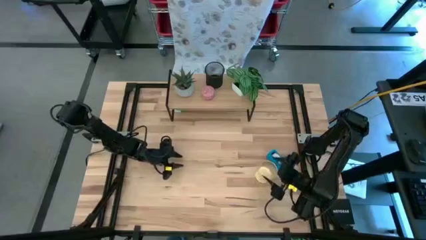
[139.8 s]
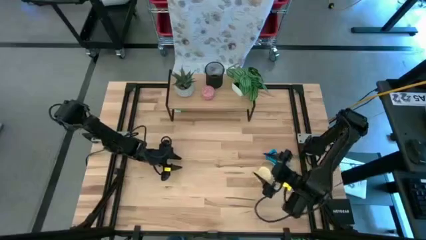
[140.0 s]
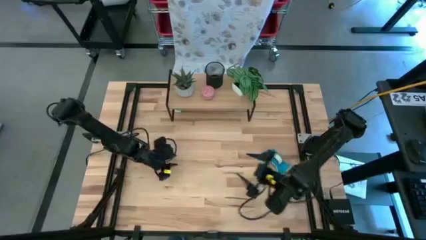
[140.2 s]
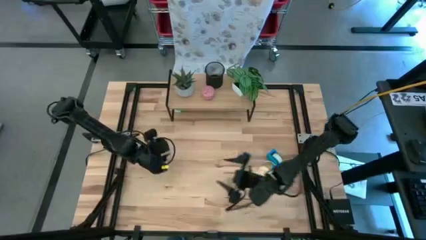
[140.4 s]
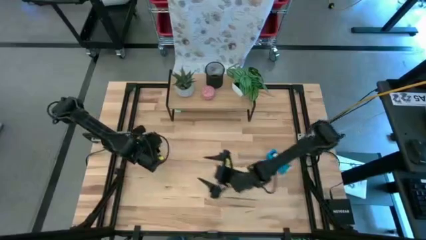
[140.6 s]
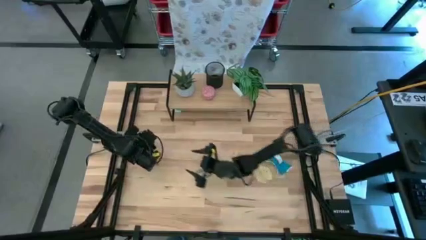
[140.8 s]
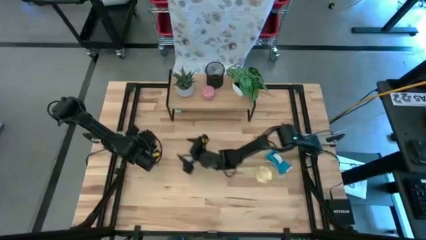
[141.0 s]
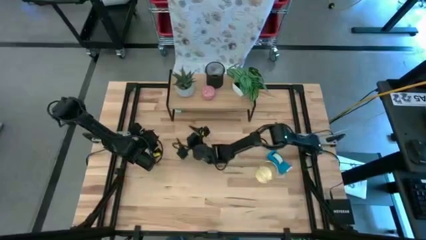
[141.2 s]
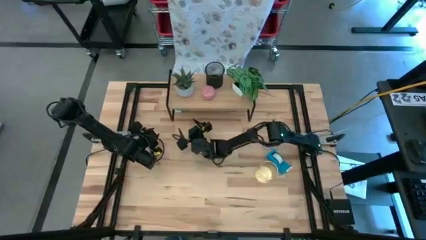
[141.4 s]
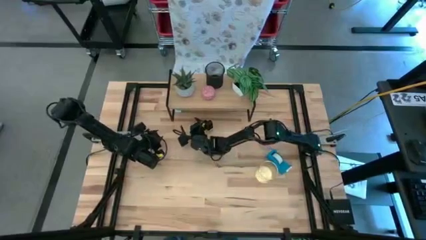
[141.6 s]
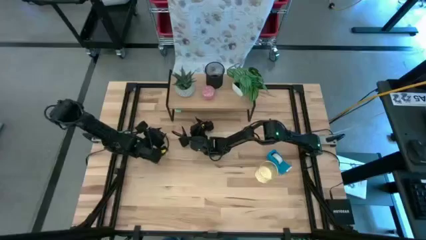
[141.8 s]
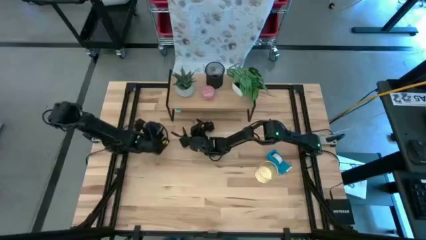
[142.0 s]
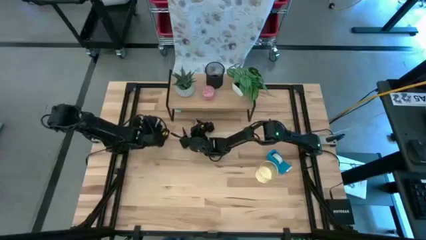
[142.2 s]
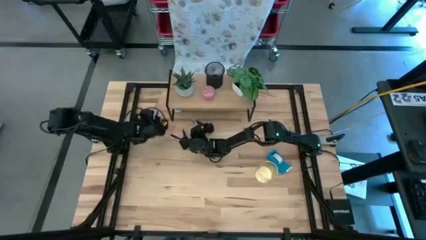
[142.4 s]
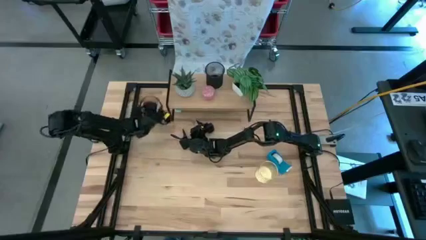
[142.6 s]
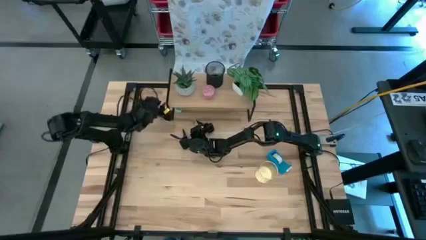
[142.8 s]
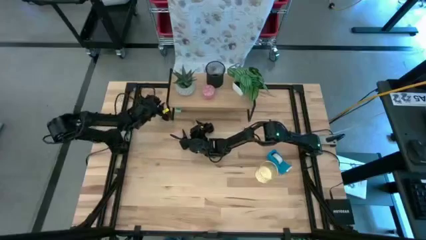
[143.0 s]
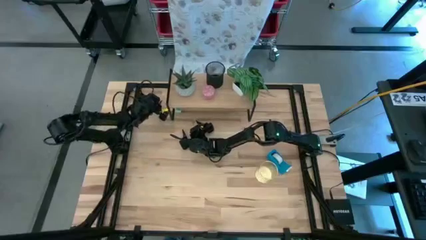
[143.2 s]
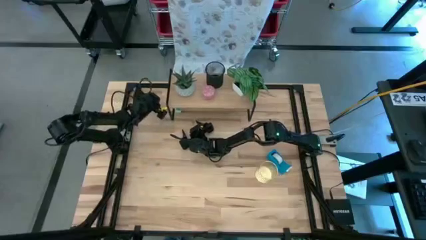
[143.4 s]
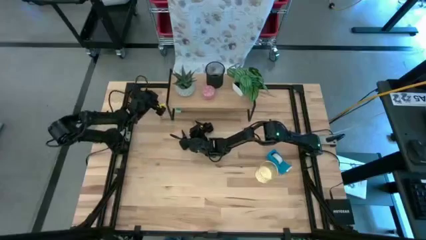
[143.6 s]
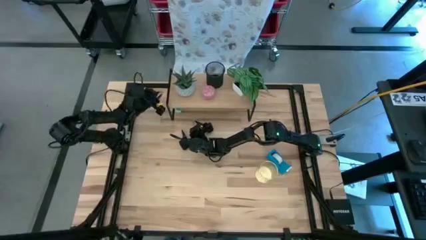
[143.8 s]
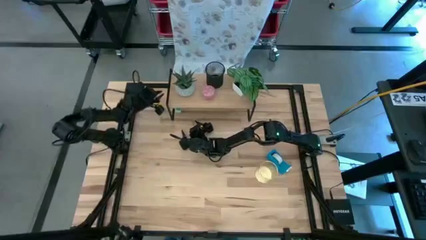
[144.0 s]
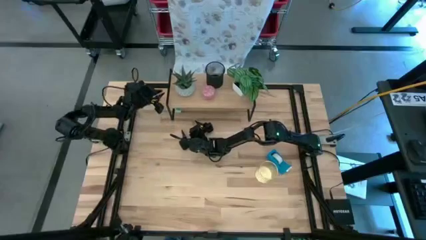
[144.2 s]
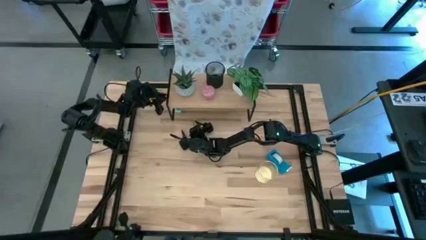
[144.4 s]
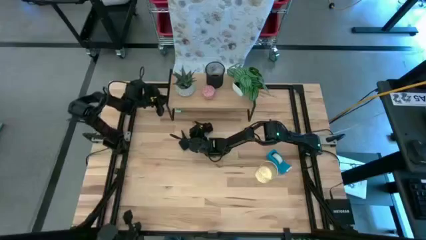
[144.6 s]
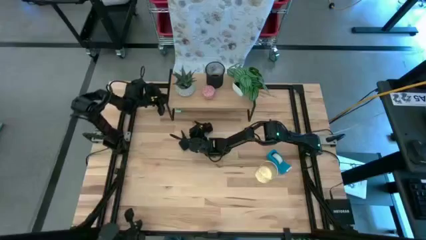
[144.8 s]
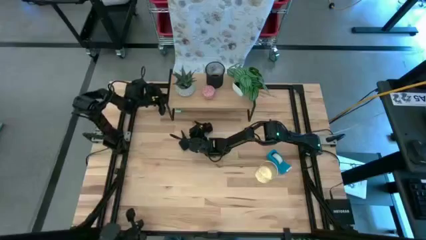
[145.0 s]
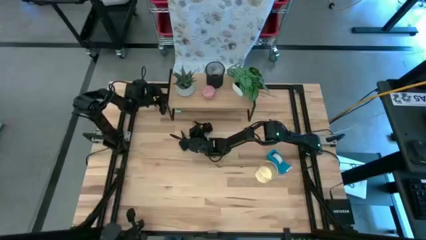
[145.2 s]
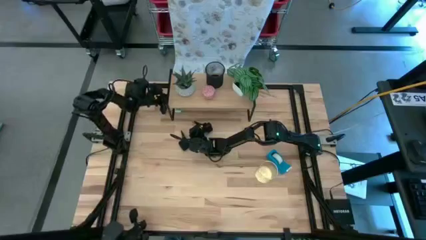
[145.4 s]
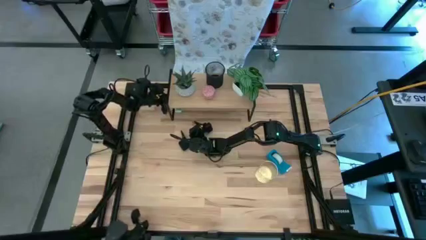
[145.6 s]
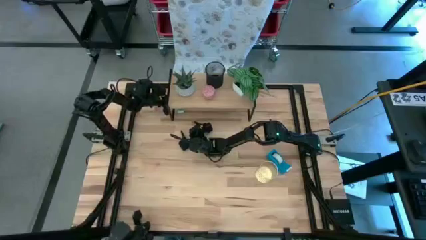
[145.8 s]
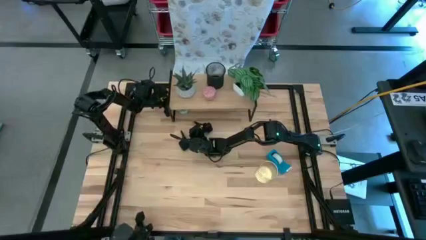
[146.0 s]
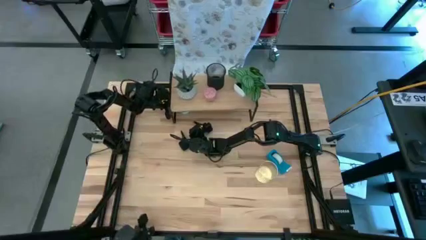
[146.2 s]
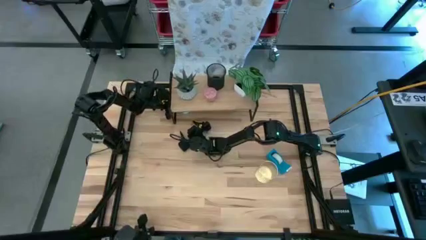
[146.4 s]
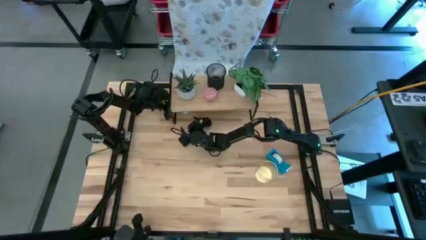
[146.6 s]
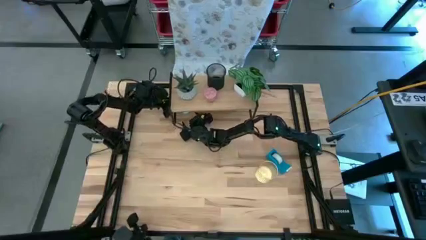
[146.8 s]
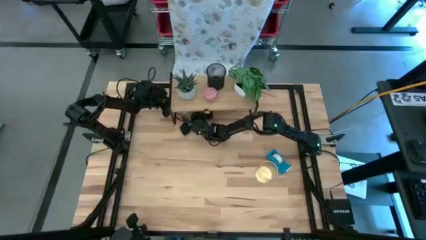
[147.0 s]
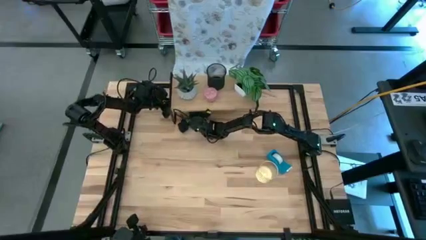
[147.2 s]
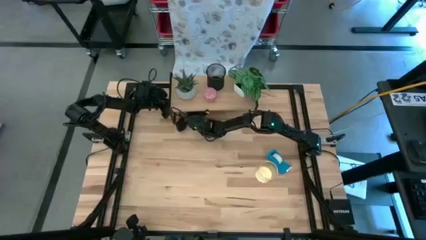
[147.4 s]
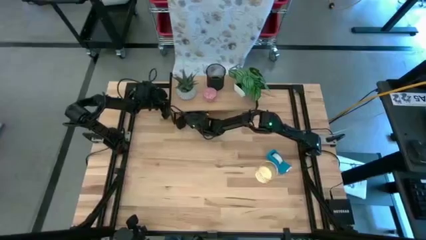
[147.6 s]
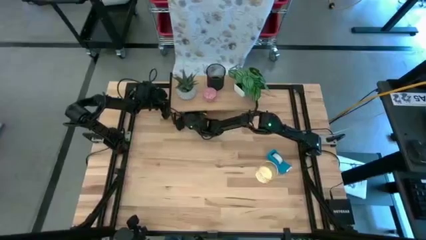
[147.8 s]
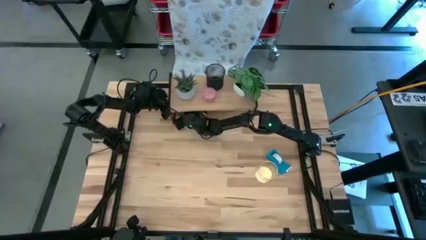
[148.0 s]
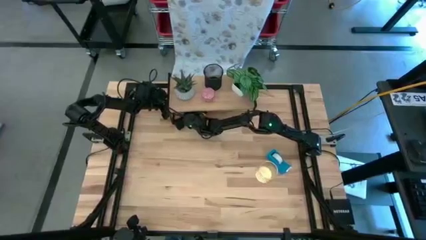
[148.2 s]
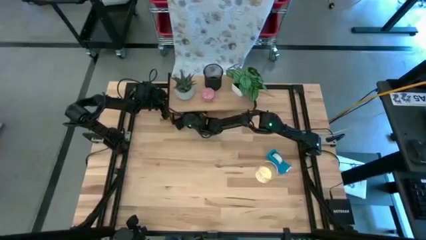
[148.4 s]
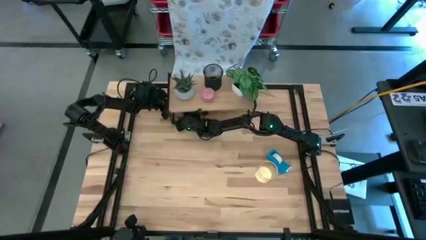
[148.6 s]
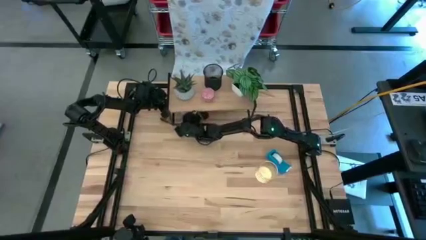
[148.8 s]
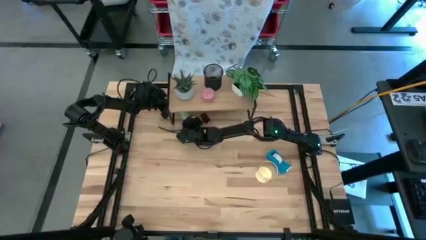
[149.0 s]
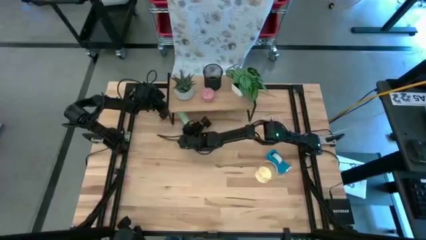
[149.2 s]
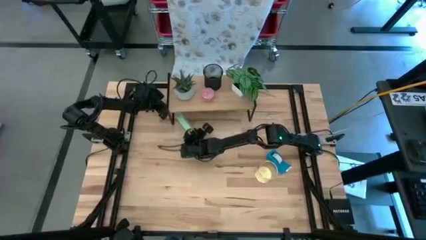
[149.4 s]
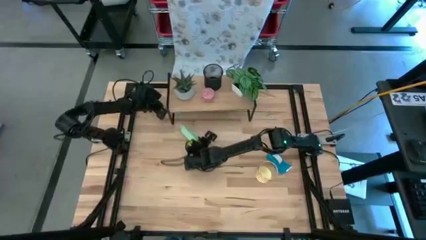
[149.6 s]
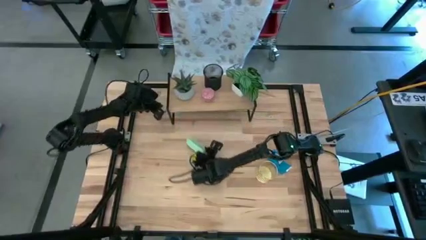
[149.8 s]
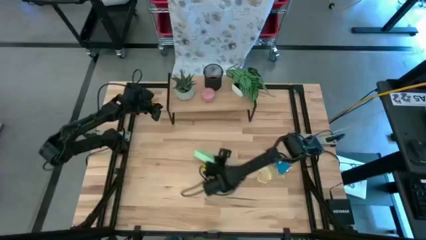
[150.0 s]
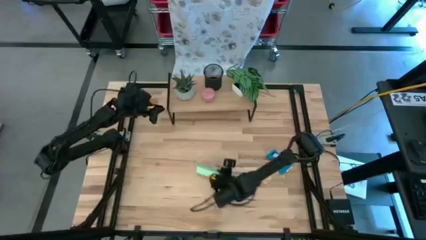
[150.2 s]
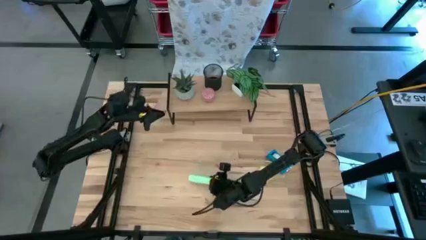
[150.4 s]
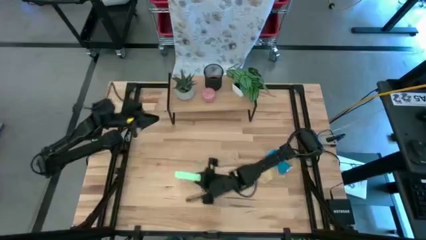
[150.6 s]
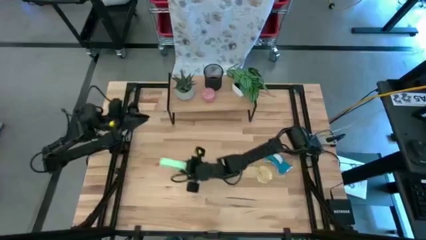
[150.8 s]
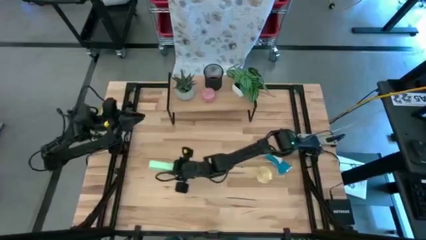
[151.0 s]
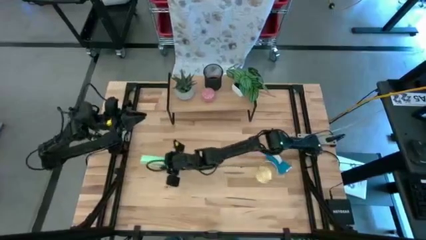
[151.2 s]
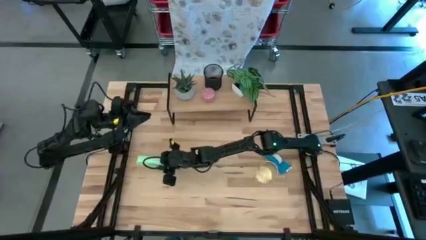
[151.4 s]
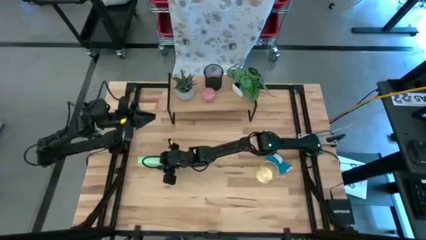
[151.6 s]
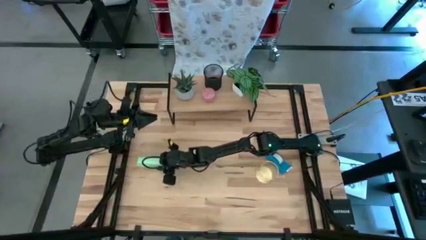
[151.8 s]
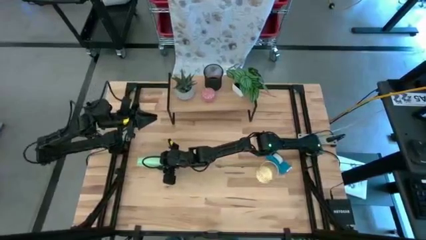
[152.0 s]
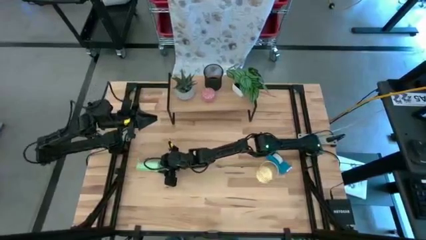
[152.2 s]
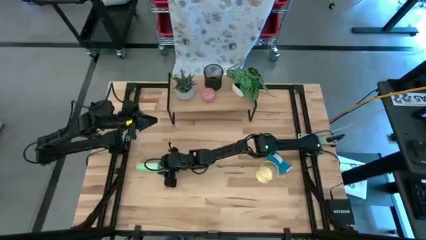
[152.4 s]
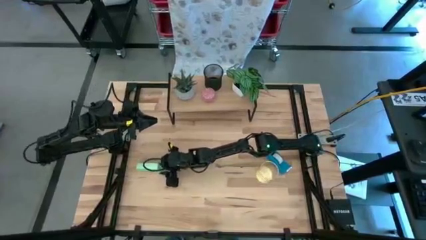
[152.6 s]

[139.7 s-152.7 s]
Task: Stock shelves
Remove the light blue stapler under the shelf
